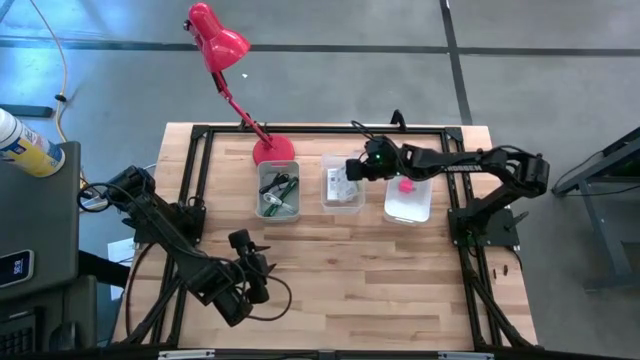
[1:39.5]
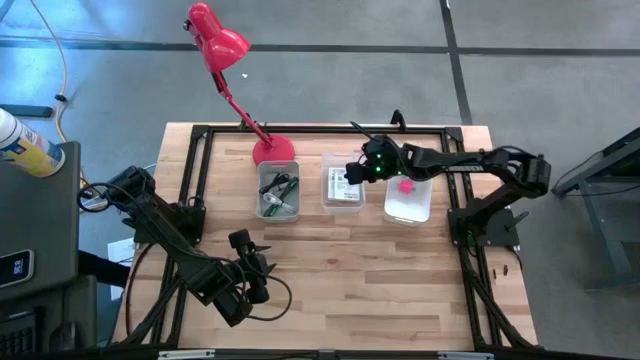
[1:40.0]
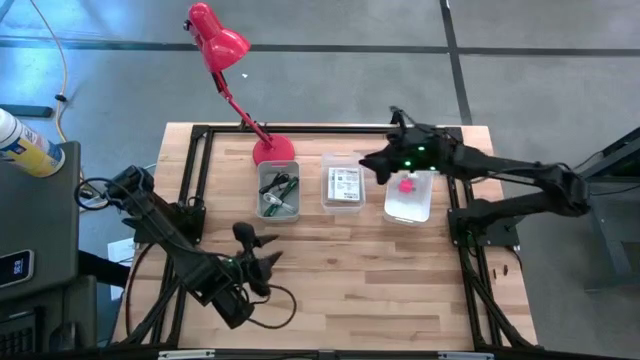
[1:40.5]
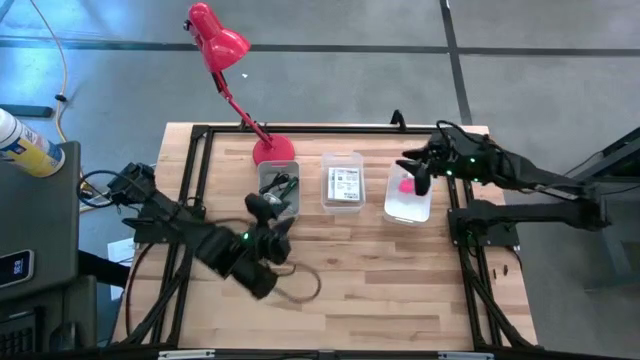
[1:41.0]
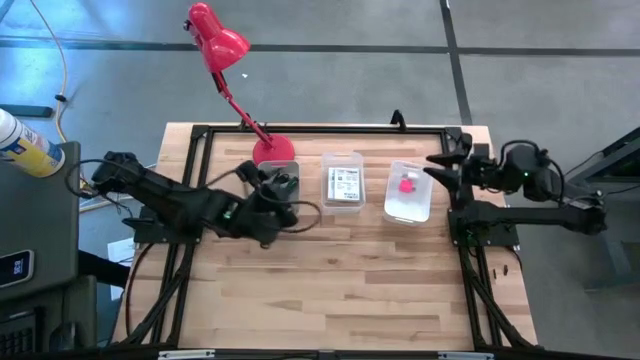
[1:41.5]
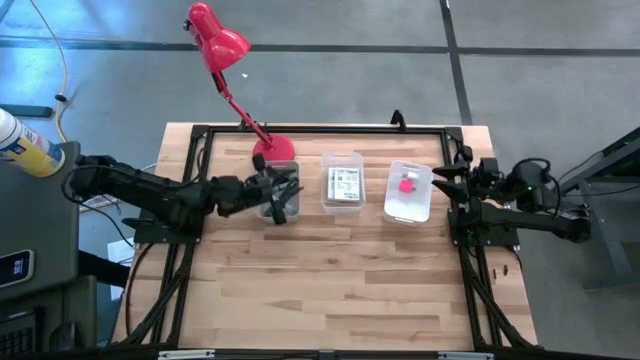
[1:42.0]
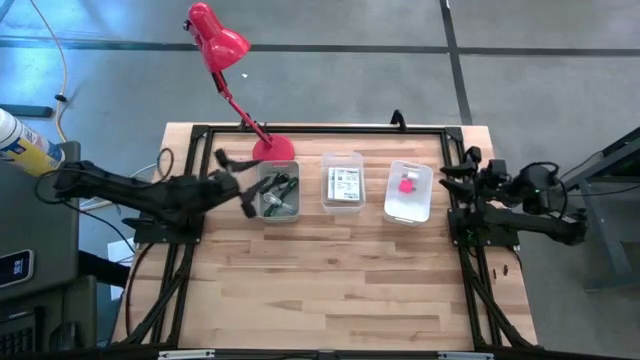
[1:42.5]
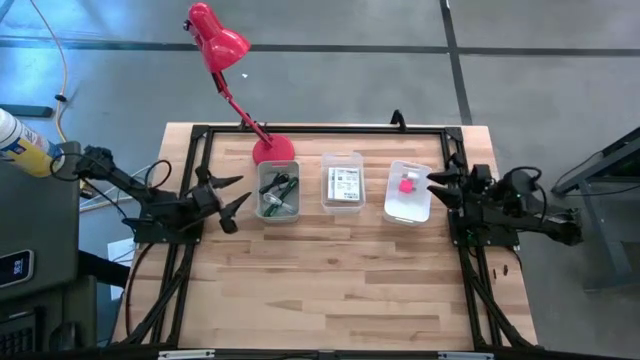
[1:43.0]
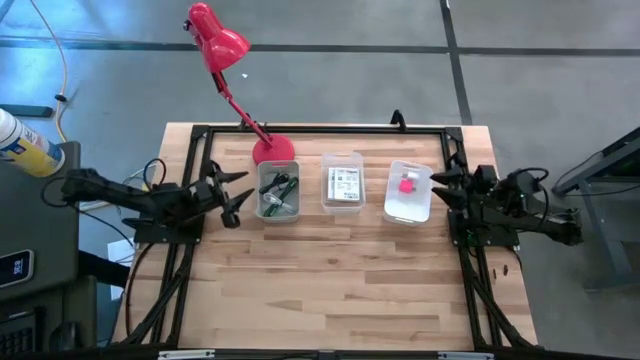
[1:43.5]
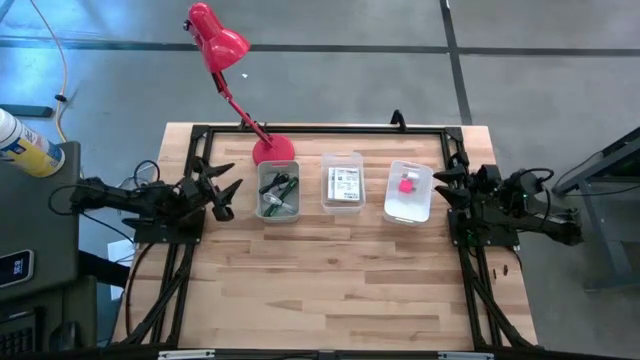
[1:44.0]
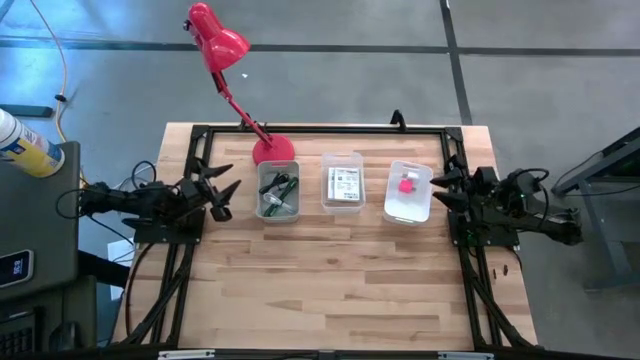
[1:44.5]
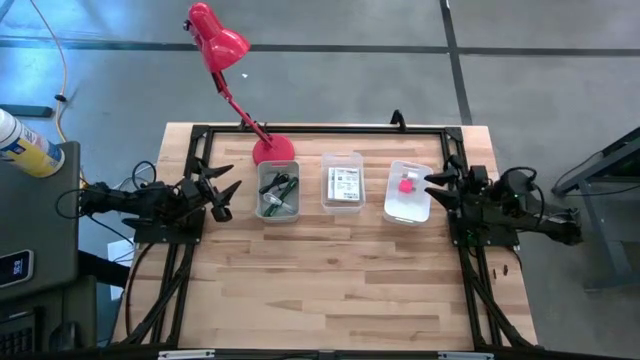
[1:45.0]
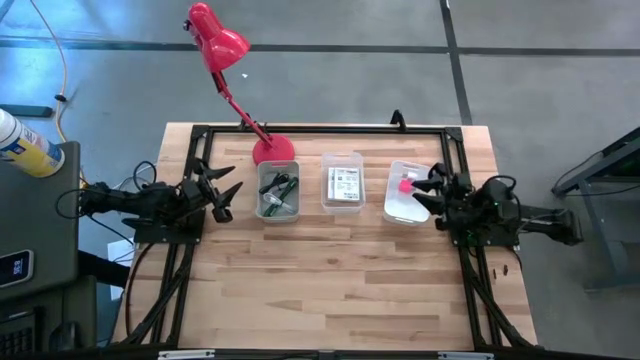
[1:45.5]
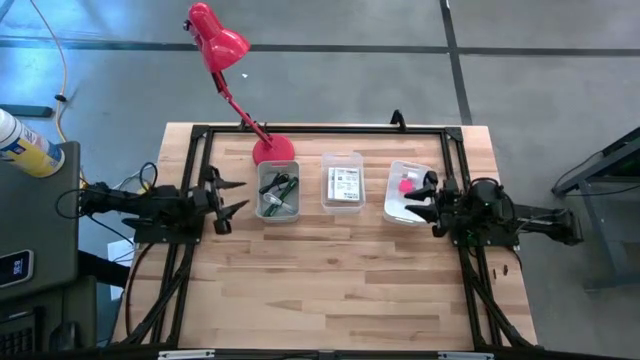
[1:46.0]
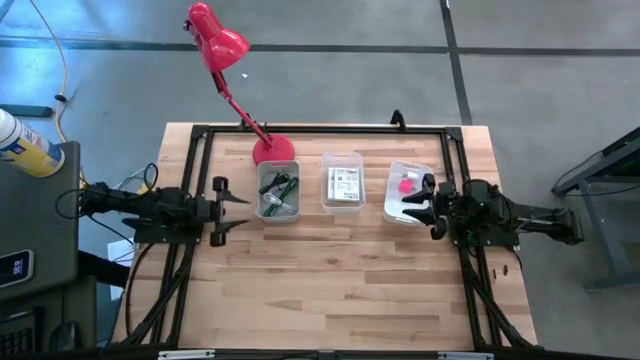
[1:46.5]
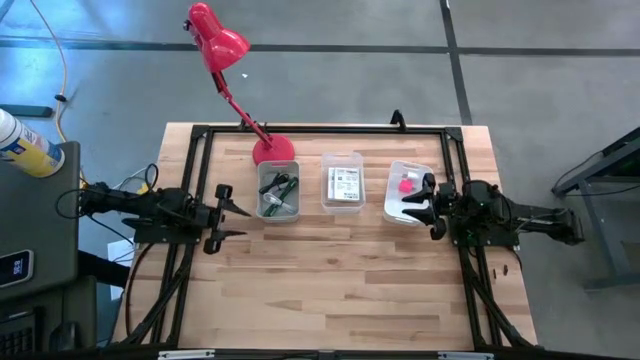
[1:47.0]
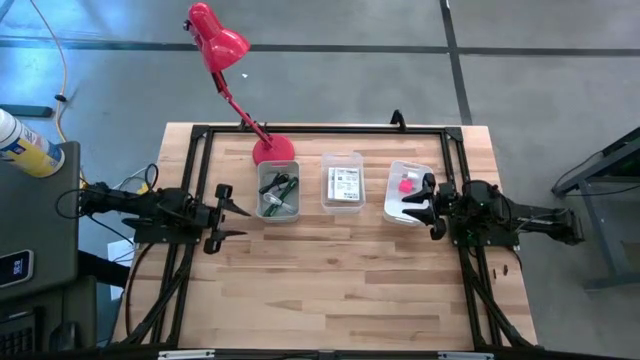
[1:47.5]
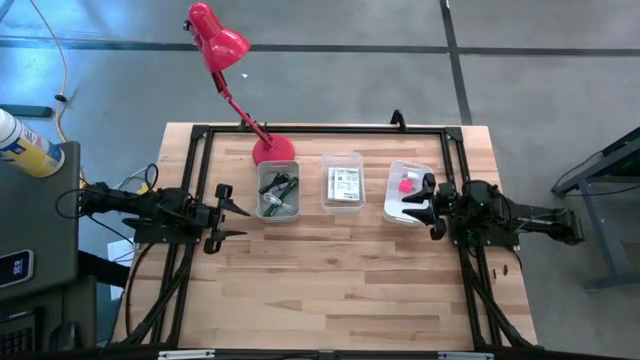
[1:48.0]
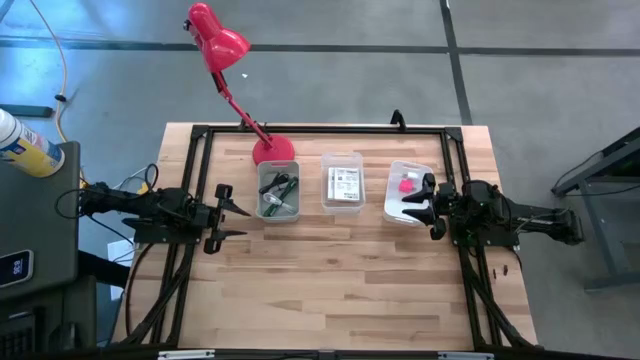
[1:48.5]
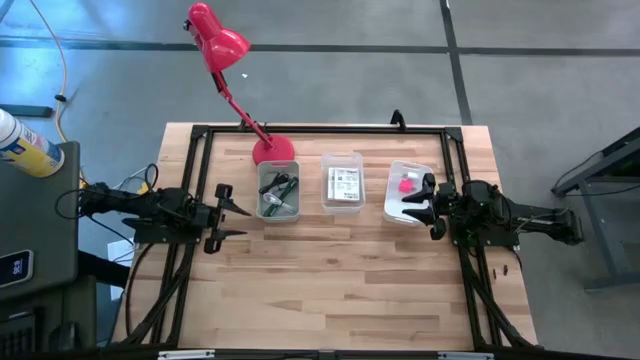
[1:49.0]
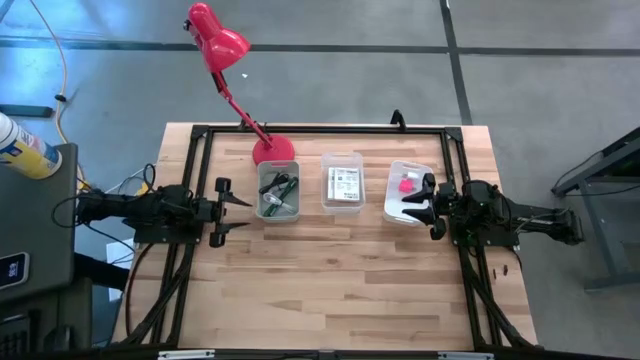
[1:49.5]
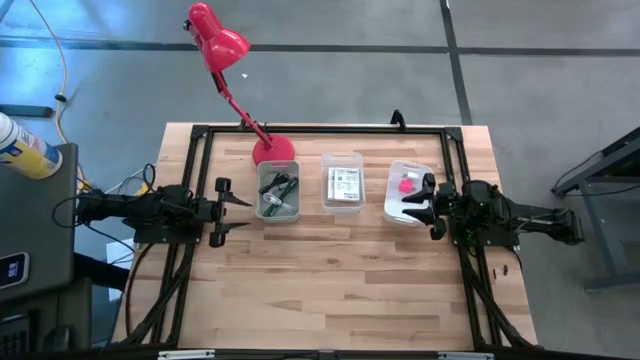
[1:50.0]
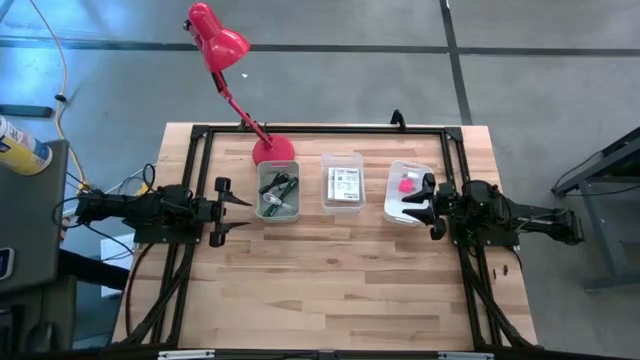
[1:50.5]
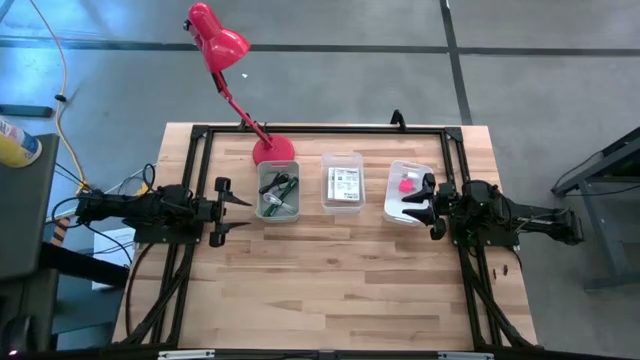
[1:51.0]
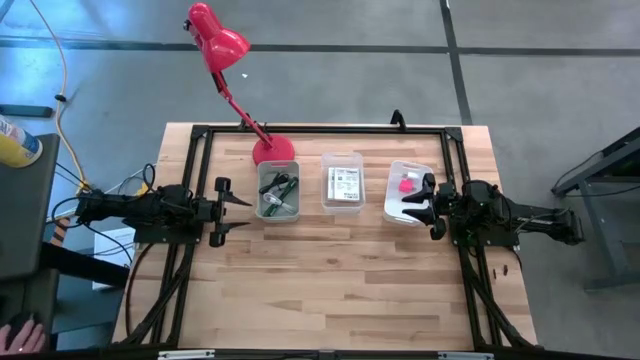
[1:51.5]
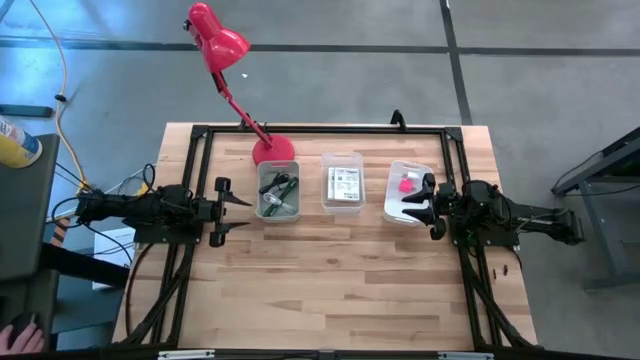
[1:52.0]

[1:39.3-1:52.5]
Task: Pick and place items into bin
Return to Home Position

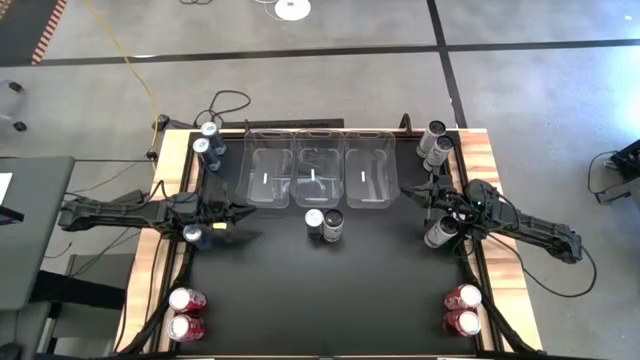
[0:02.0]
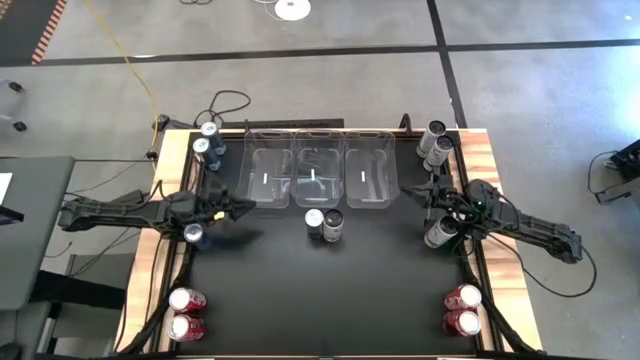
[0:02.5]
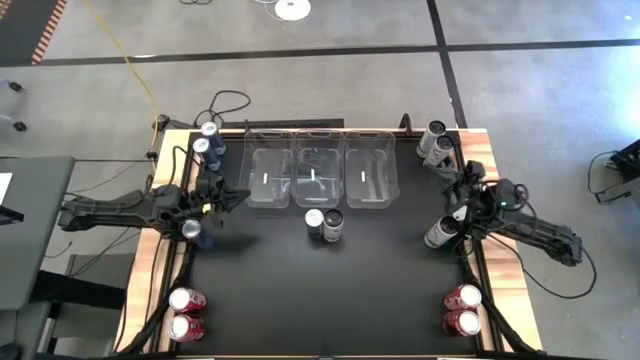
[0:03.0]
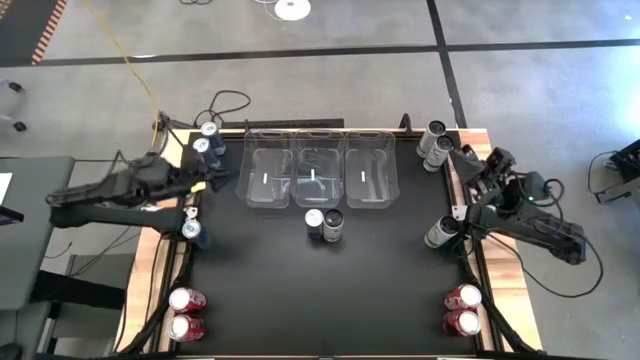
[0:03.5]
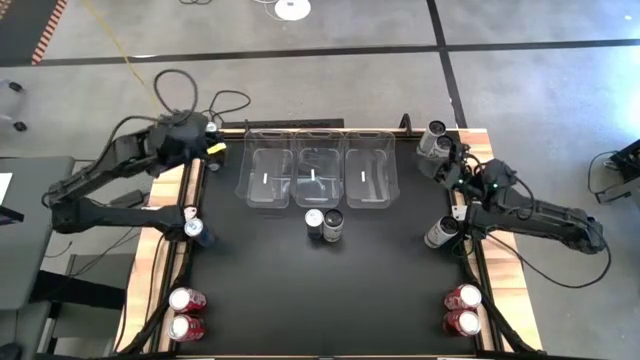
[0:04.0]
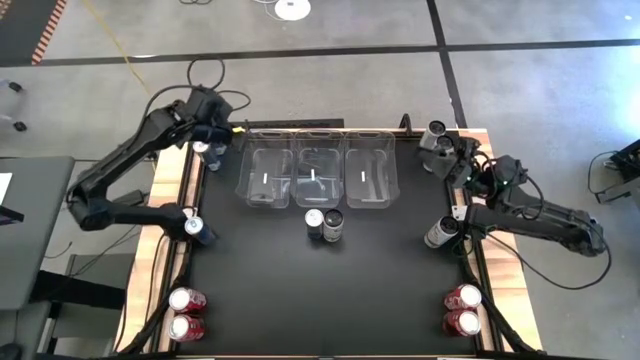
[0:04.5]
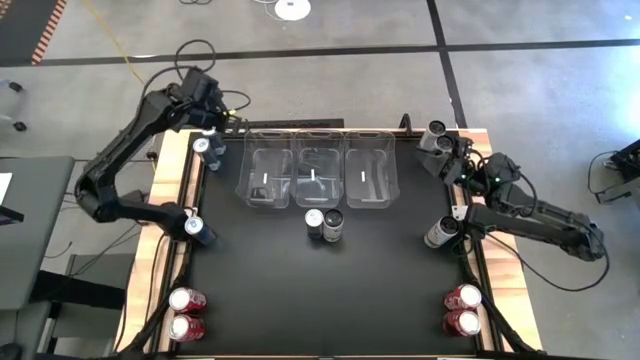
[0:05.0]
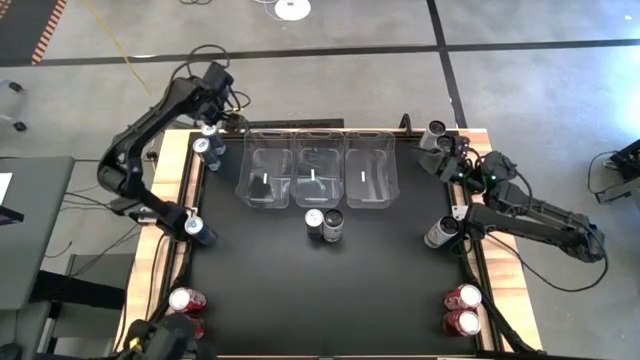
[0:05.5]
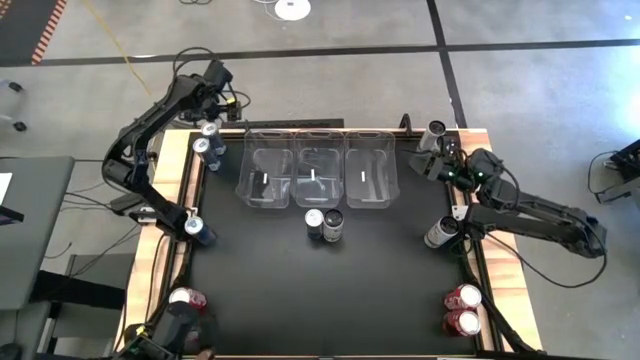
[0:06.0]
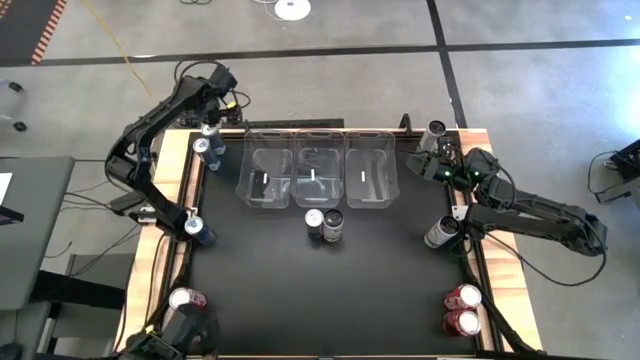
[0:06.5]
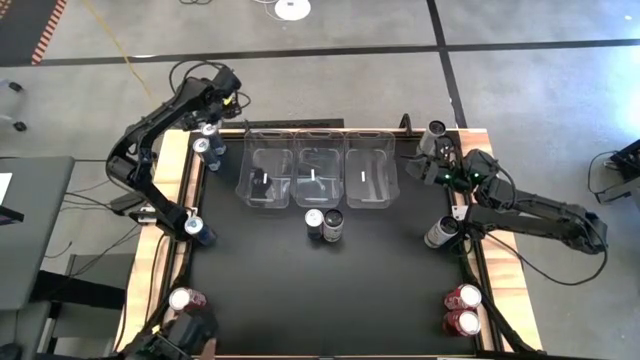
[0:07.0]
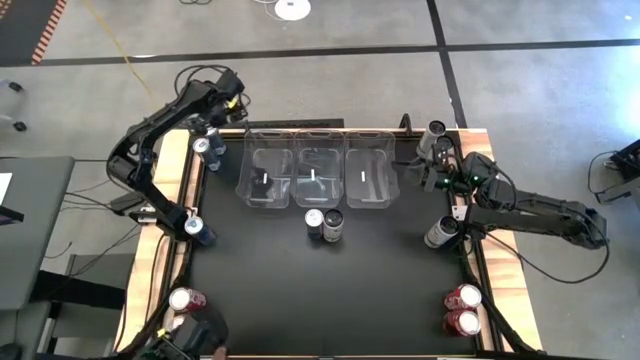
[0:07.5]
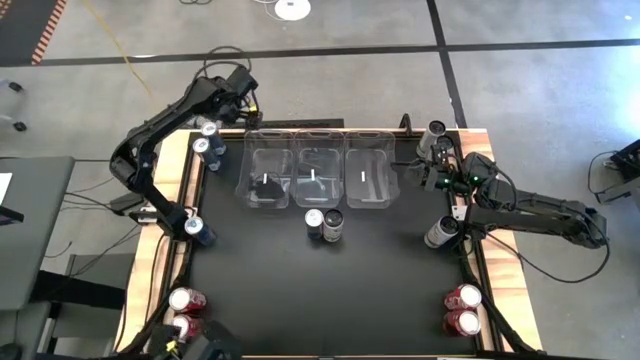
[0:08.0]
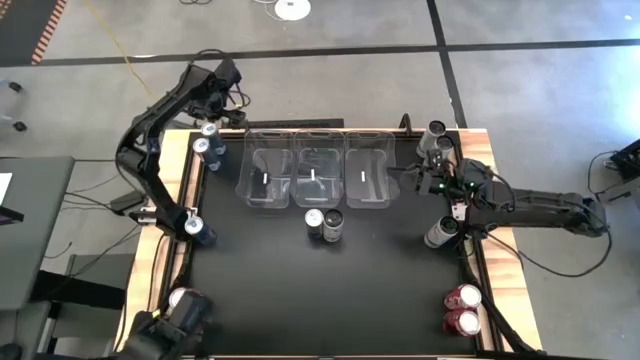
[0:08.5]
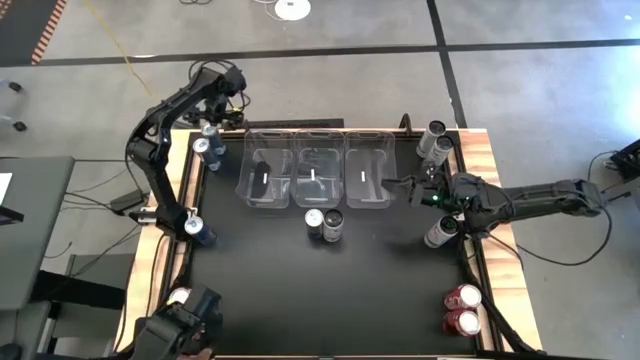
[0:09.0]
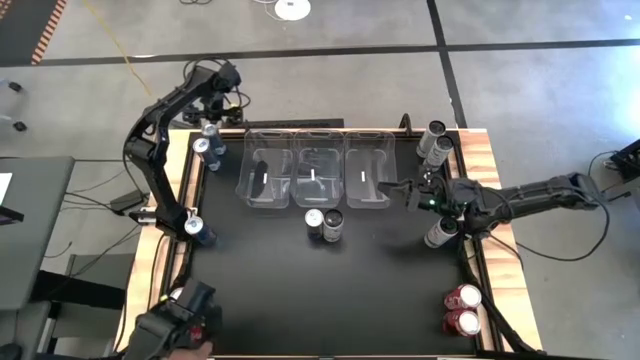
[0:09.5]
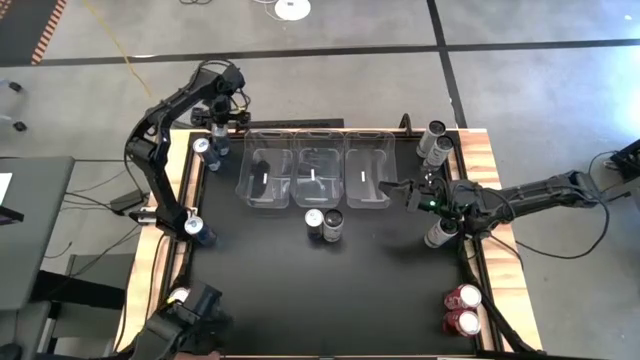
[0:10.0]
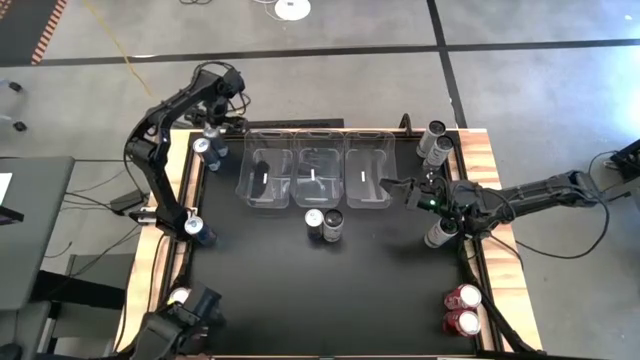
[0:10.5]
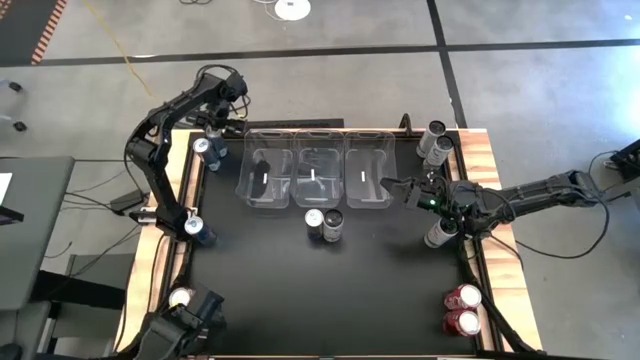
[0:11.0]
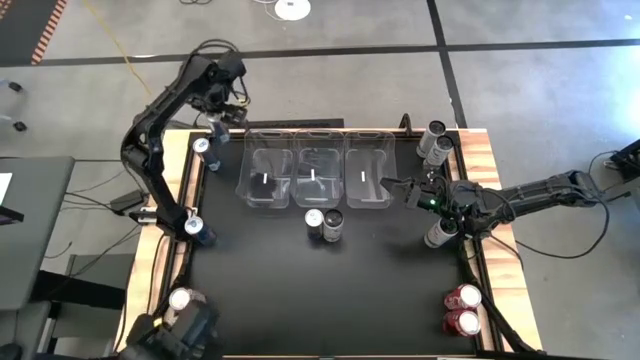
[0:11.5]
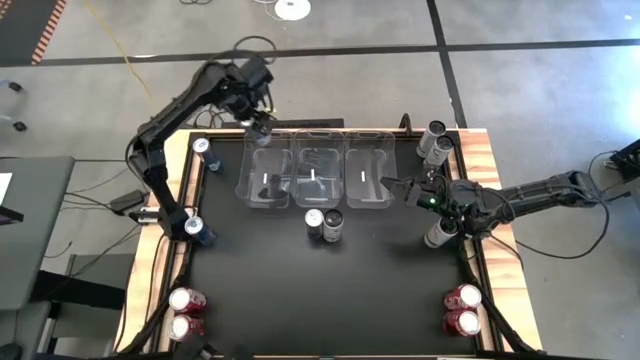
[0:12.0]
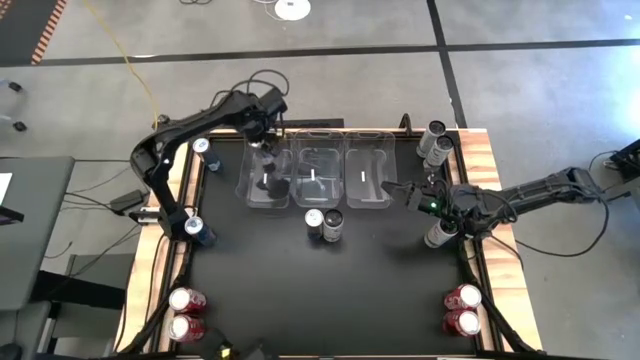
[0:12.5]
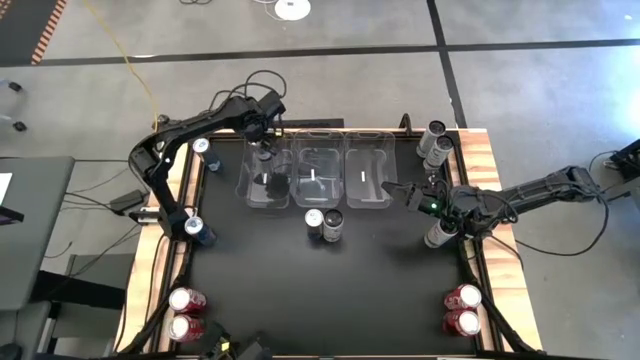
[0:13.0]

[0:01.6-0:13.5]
Task: Sort soda cans
Put the top blue soda can into the left transparent bin
